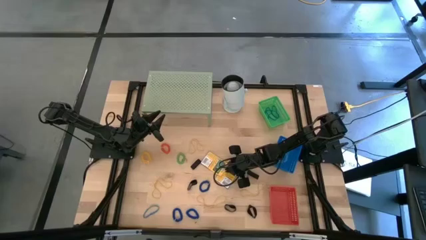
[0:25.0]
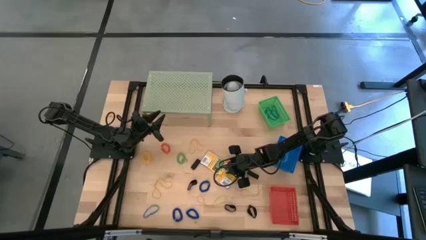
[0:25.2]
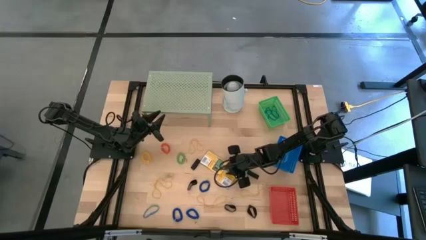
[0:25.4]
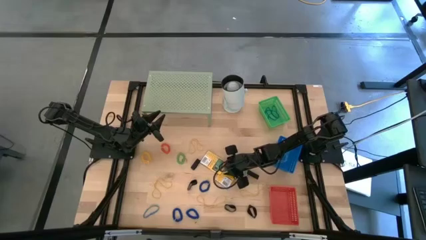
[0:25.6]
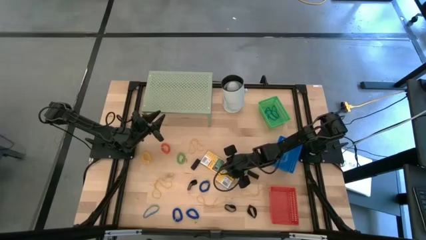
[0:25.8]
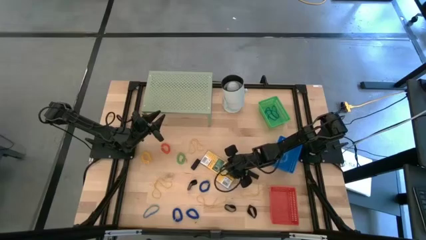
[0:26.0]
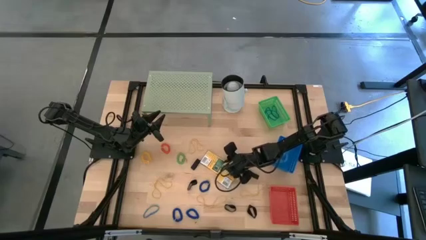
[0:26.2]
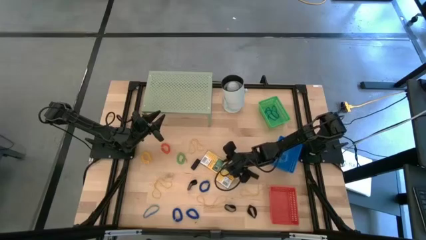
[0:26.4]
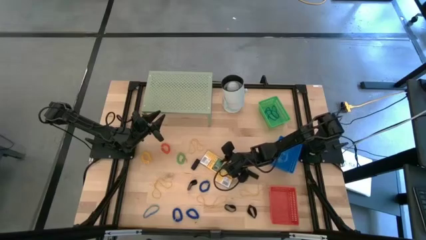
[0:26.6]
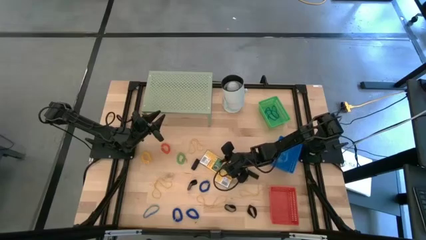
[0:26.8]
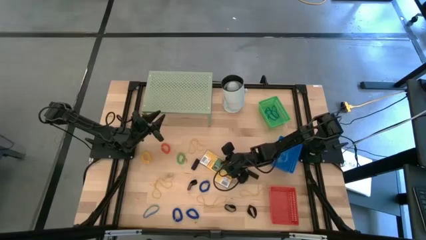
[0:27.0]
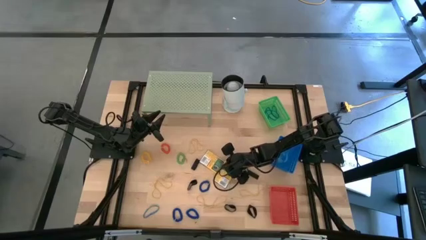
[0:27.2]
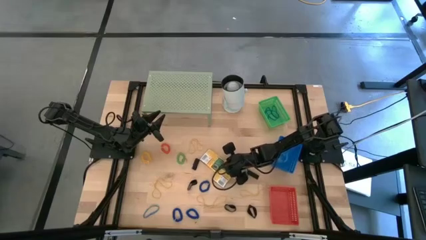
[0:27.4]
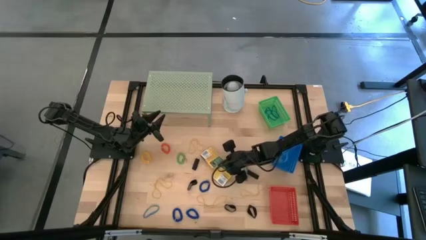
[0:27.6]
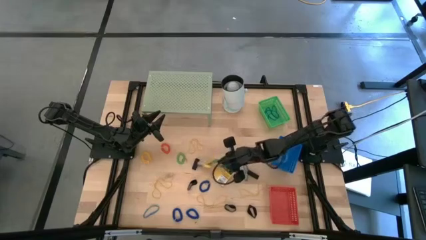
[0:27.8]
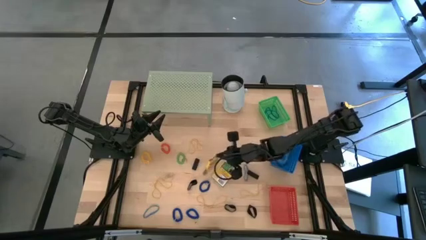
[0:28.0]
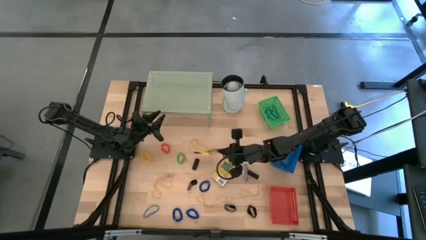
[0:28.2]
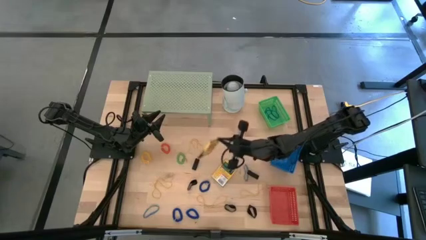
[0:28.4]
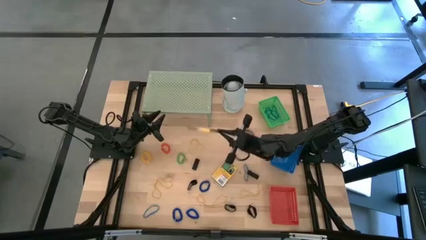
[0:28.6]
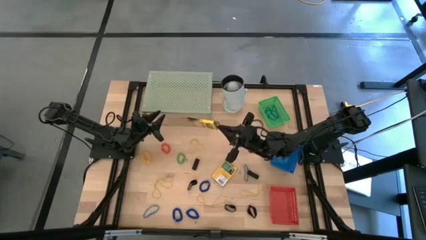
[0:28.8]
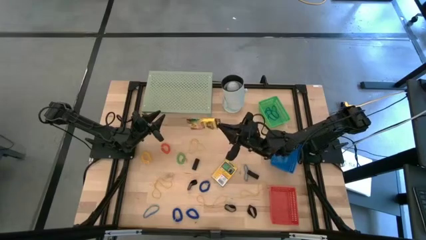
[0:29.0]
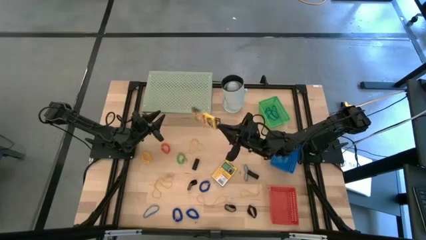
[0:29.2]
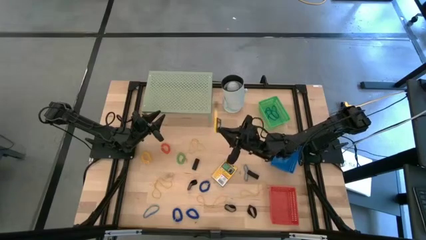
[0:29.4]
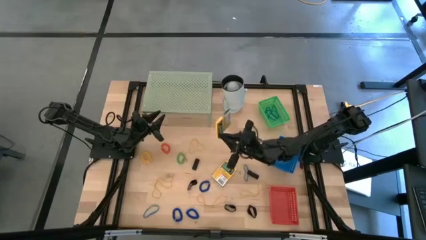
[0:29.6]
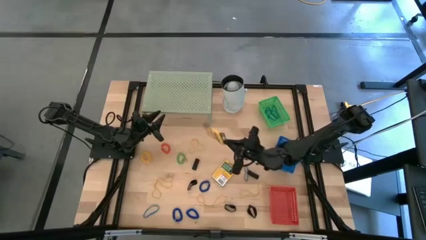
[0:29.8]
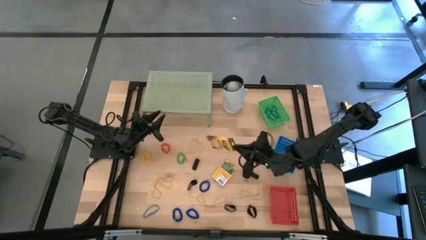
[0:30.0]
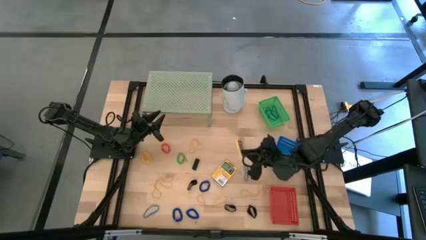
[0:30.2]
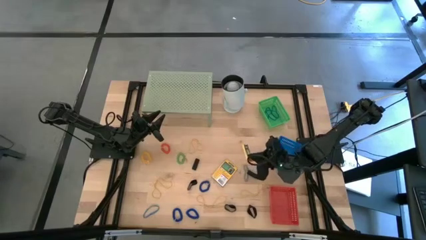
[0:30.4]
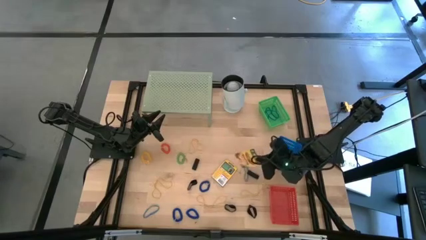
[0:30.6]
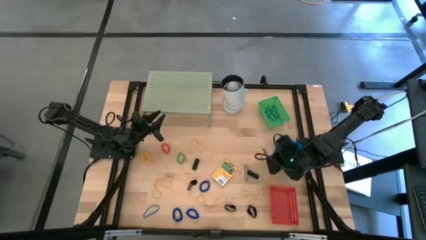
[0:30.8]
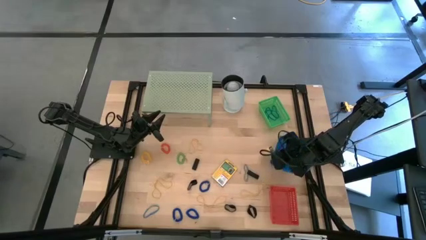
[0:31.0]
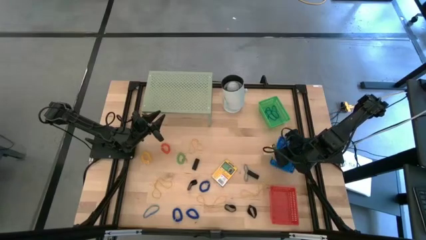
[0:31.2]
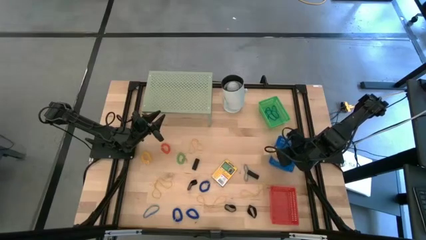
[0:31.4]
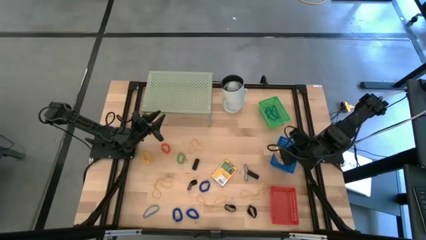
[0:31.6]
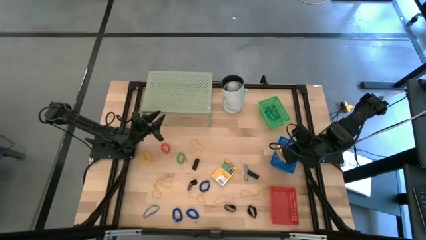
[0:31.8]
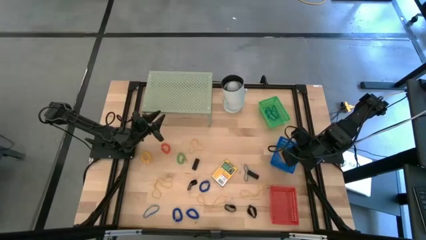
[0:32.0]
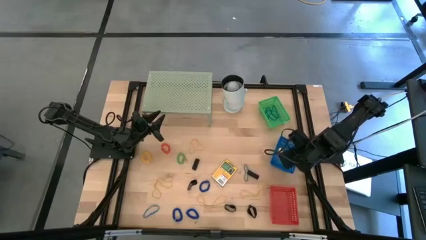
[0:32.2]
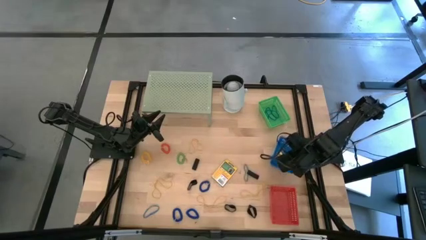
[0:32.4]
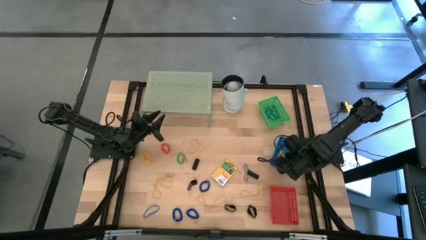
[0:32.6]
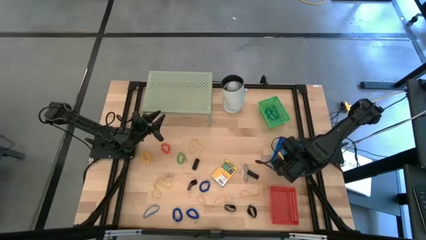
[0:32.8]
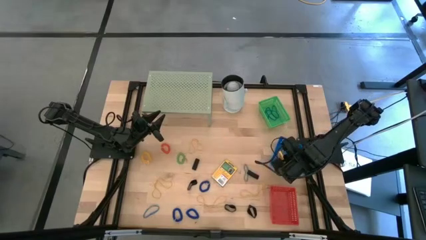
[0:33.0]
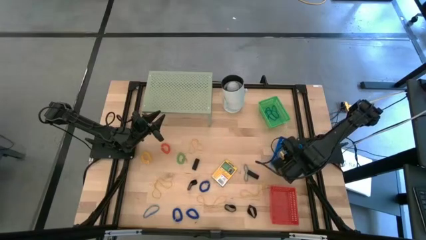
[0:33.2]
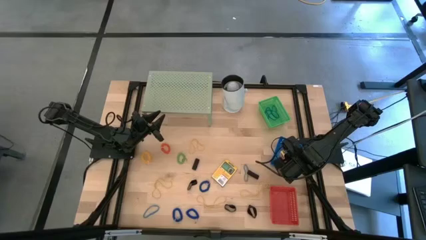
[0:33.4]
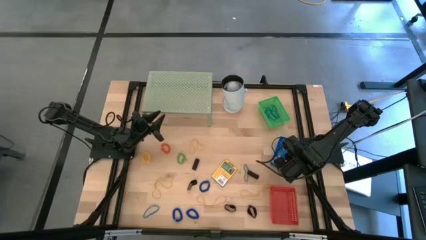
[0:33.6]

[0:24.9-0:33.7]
Task: Pick & Place Office Desk Supplies
Put the yellow crayon box into the blue bin

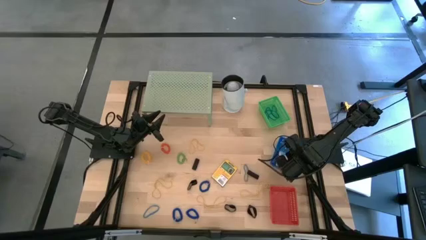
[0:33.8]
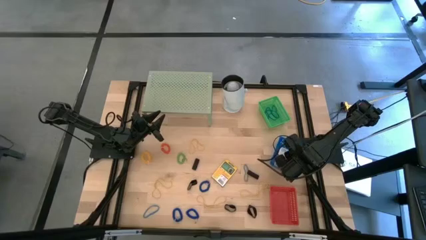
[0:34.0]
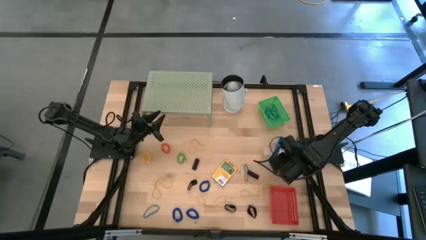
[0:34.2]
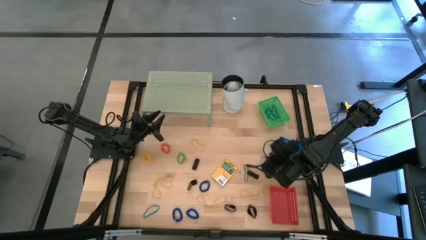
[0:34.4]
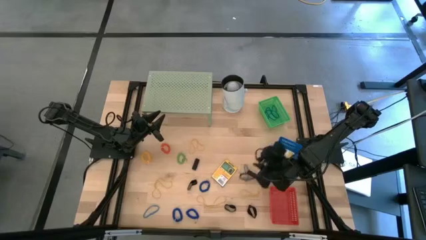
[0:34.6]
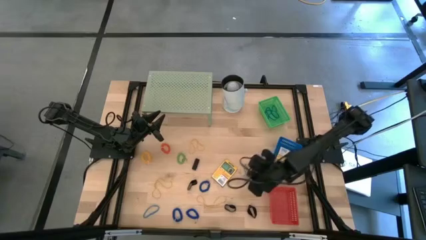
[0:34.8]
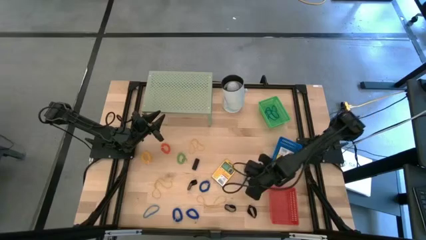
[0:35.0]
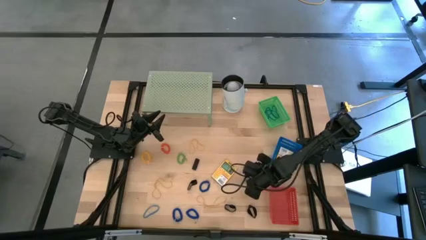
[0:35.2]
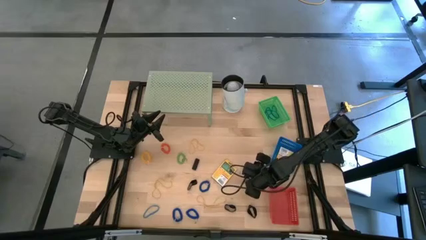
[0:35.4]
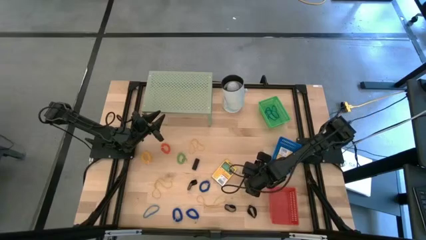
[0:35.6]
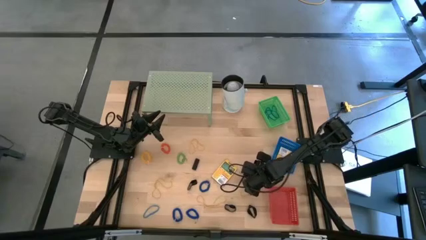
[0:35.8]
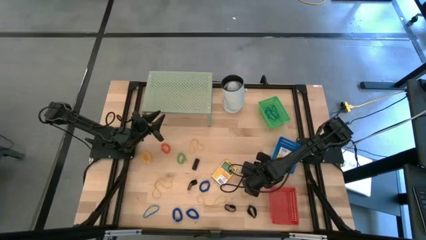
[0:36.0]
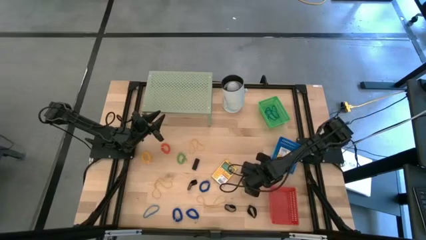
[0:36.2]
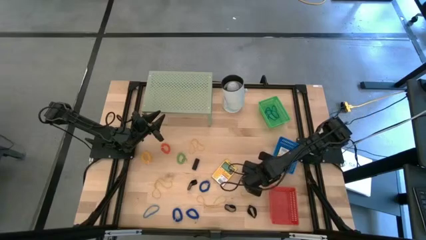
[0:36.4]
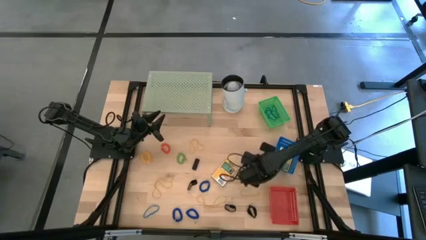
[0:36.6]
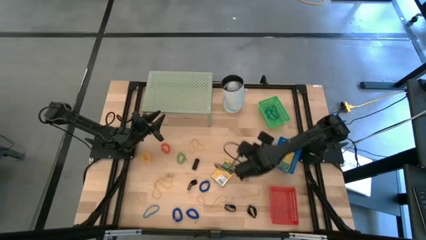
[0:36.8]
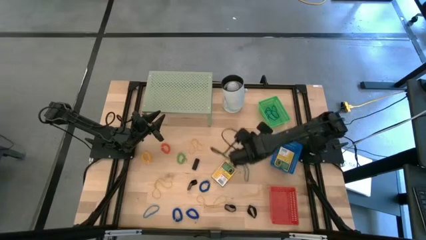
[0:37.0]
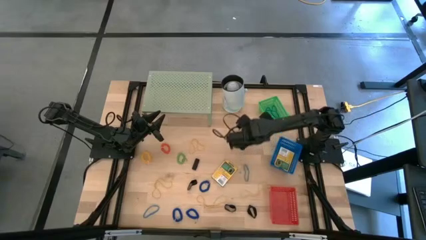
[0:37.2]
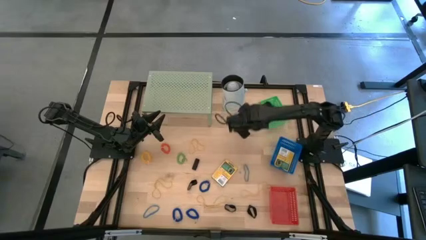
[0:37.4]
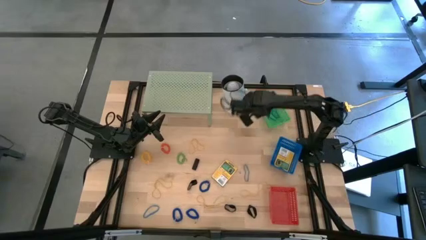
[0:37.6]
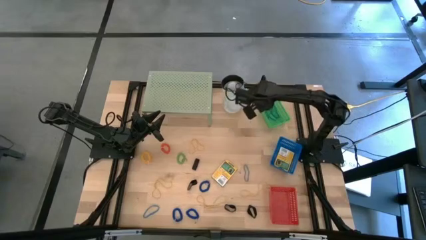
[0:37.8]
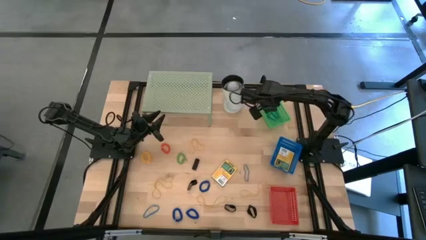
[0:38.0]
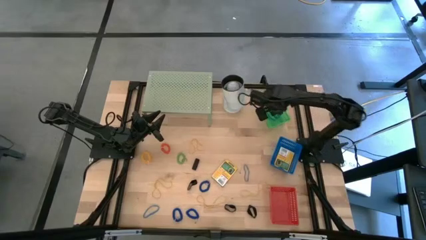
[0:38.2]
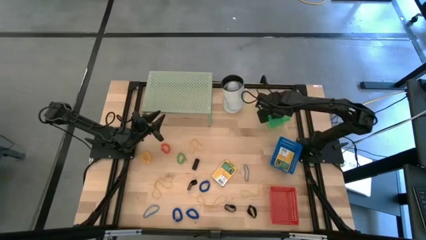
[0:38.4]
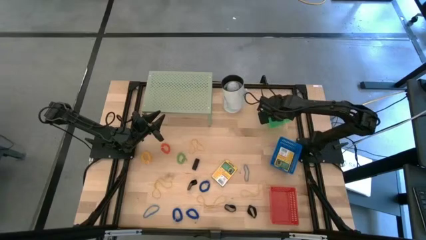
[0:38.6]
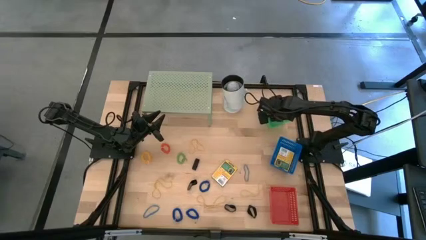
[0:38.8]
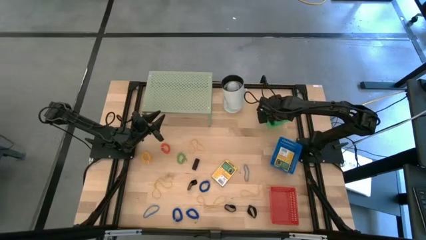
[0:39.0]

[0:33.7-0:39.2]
Put the black rubber band into the green bin

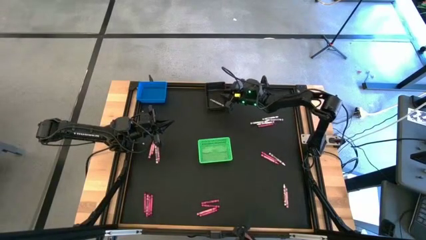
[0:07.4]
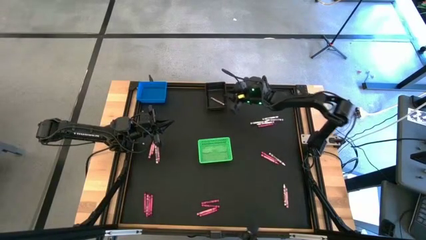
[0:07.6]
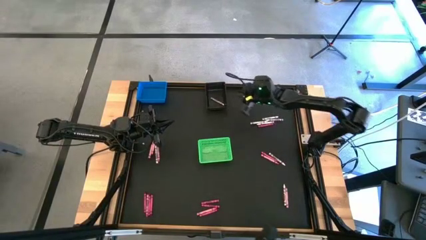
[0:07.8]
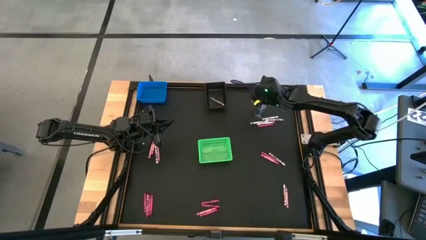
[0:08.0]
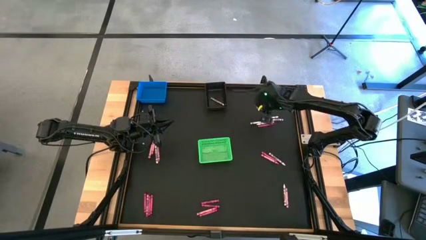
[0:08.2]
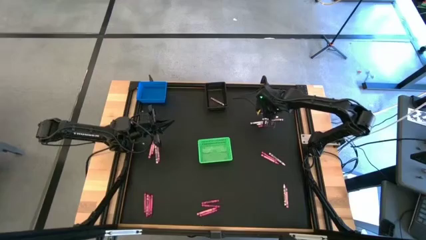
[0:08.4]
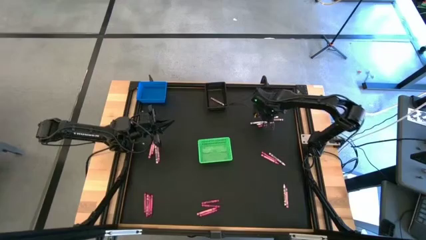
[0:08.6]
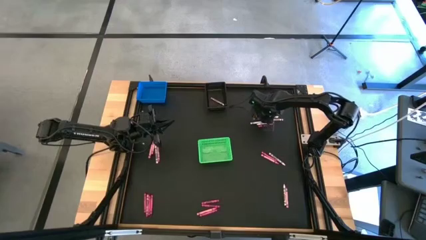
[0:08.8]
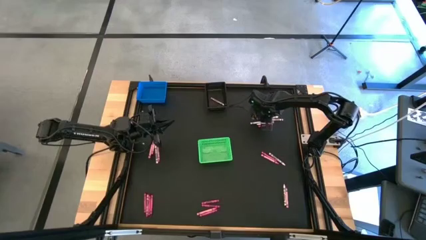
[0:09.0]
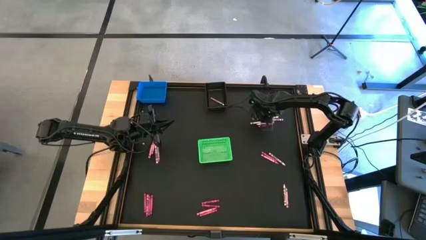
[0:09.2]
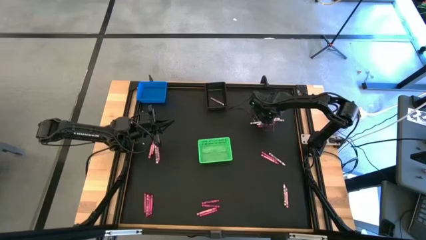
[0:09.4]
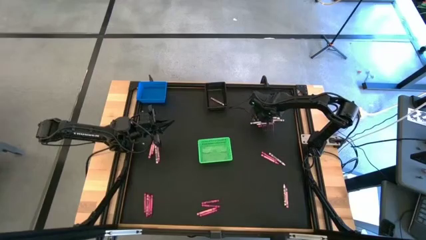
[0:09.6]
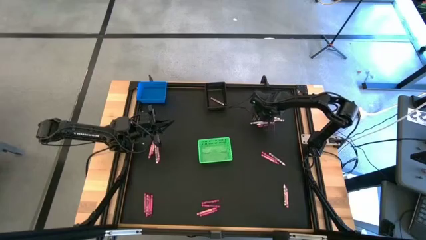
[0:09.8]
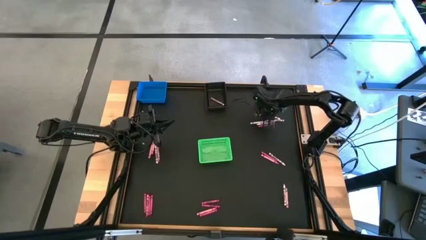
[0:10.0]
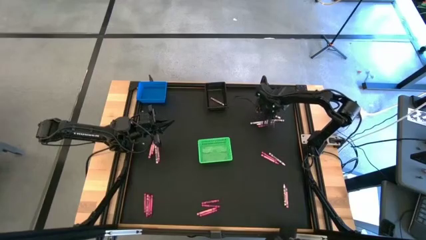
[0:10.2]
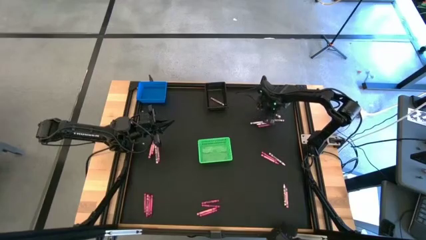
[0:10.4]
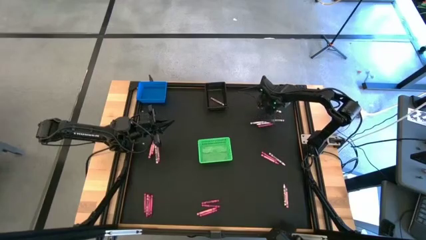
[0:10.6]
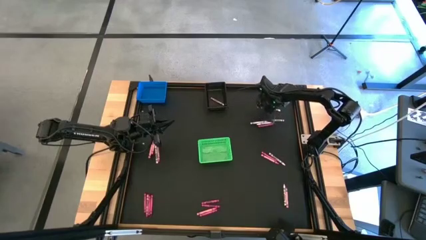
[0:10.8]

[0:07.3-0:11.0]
Task: Sort crayons
Put the white crayon into the black bin
